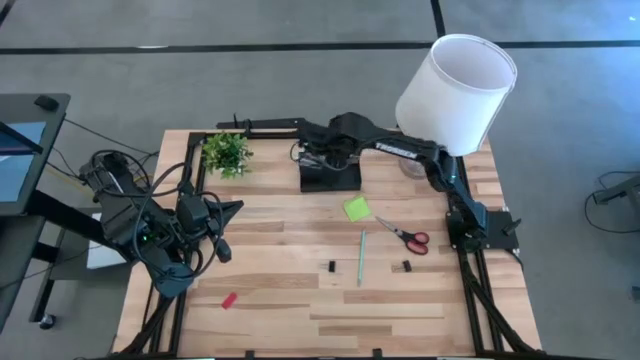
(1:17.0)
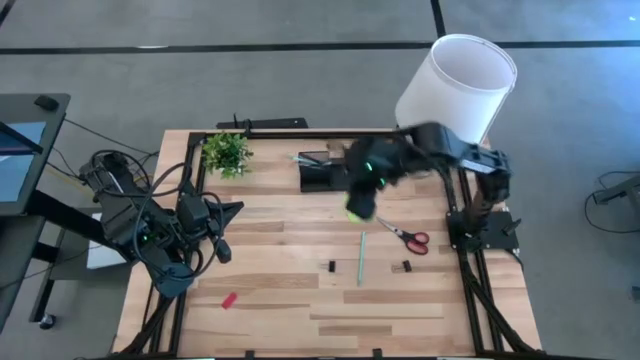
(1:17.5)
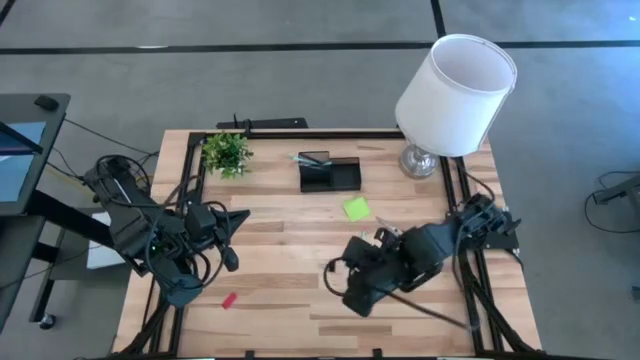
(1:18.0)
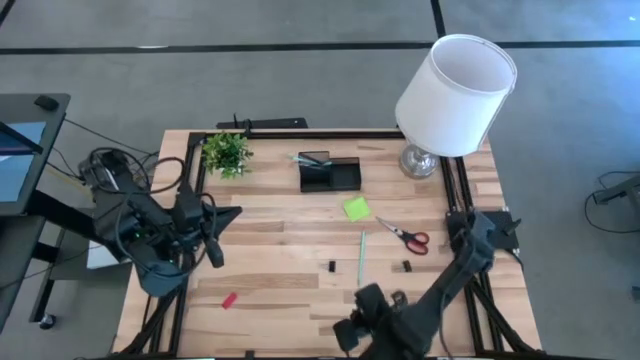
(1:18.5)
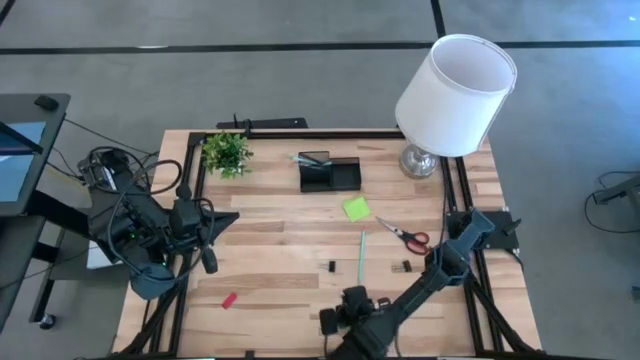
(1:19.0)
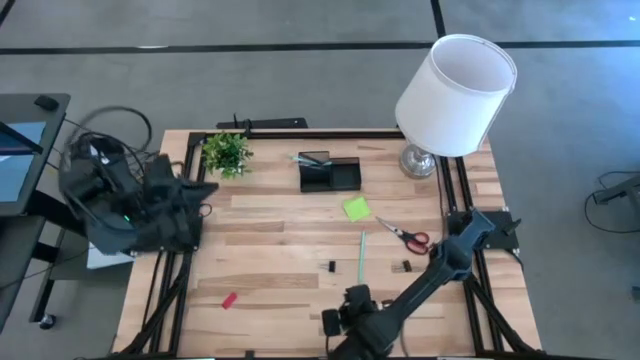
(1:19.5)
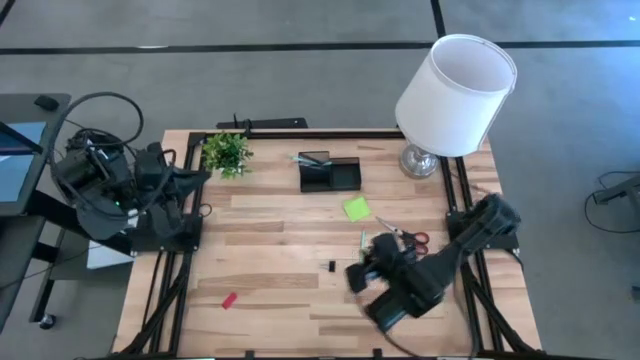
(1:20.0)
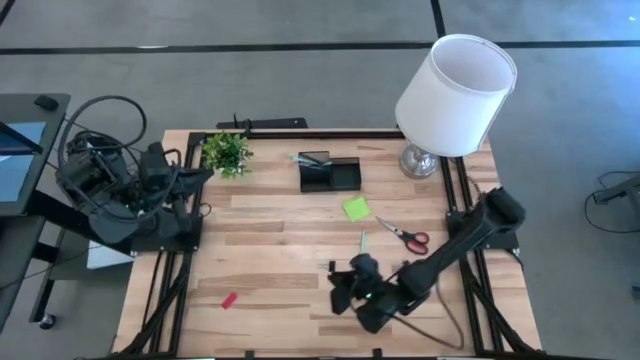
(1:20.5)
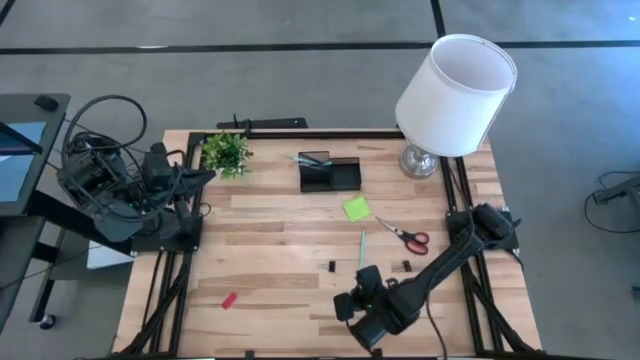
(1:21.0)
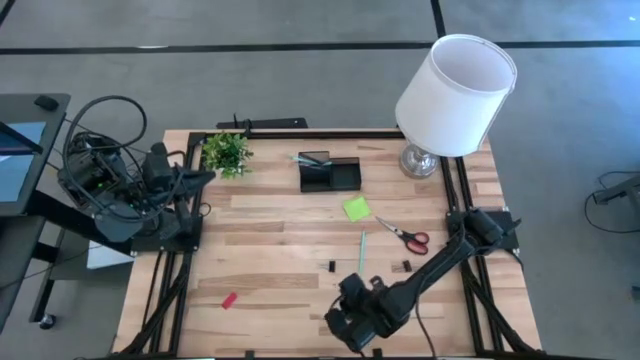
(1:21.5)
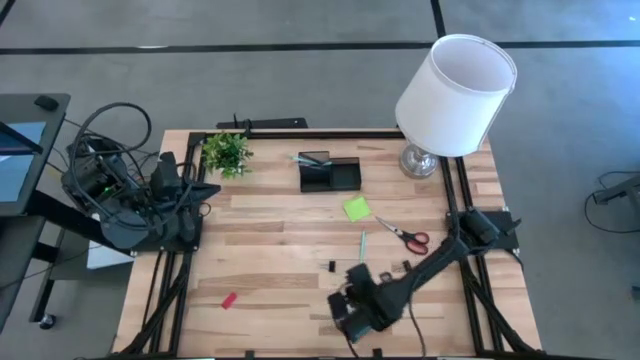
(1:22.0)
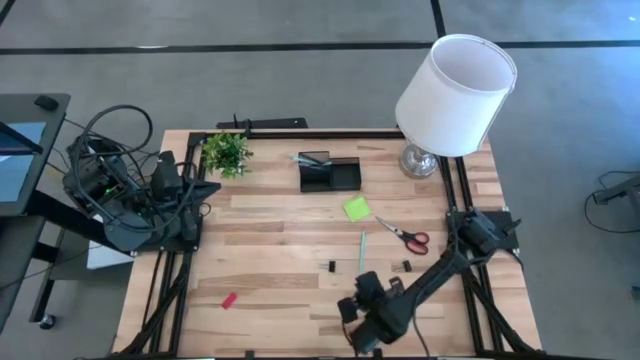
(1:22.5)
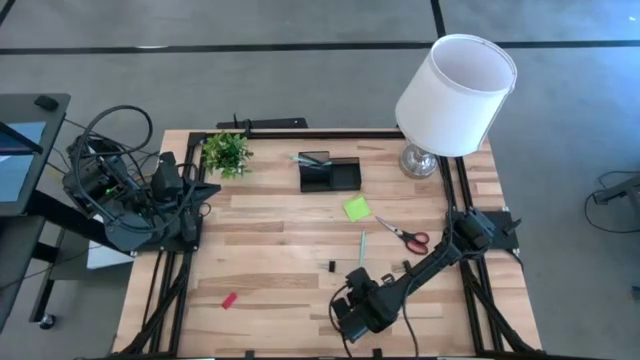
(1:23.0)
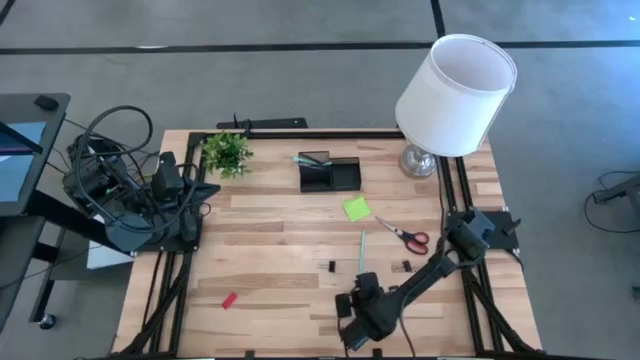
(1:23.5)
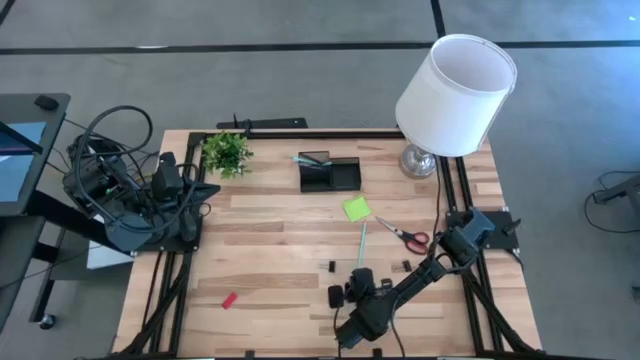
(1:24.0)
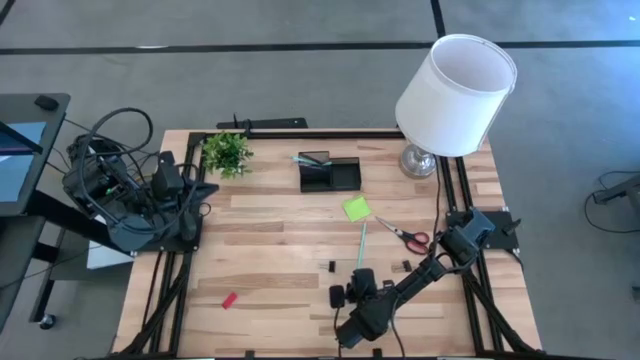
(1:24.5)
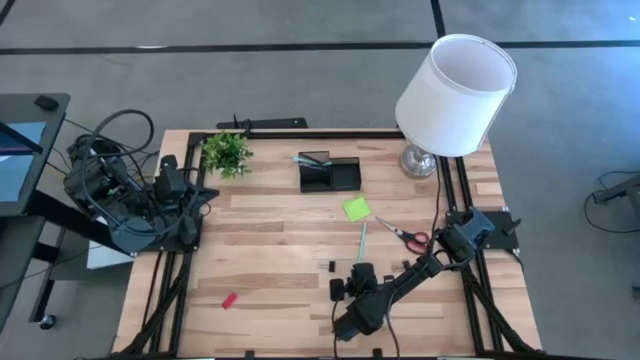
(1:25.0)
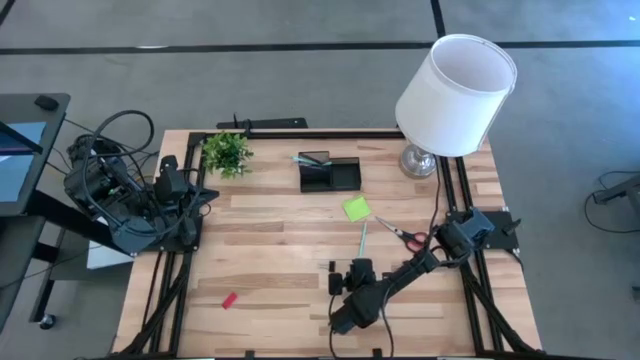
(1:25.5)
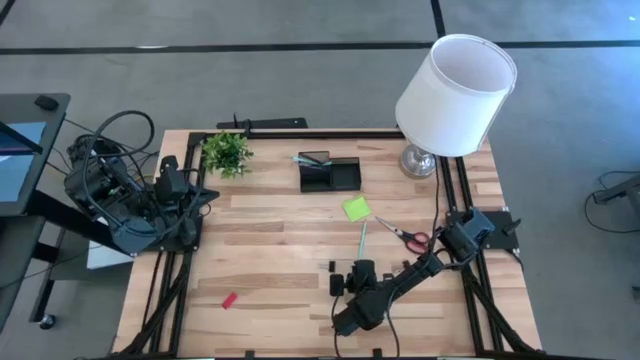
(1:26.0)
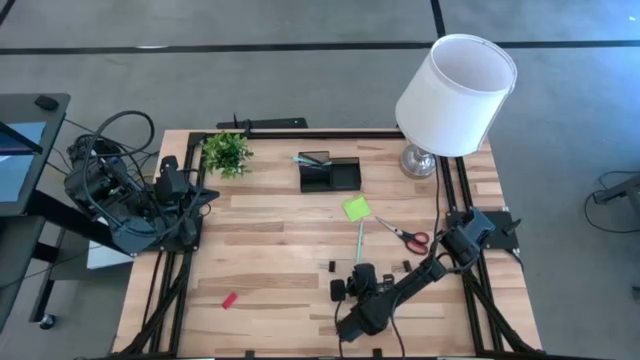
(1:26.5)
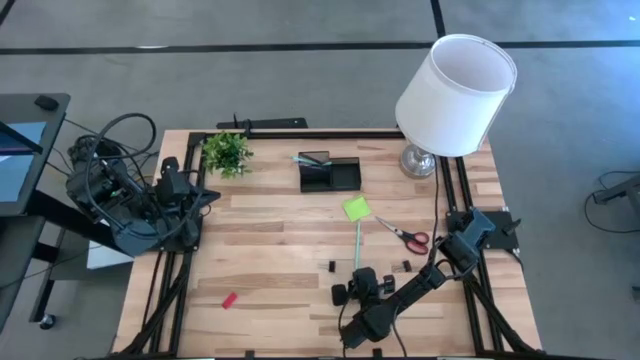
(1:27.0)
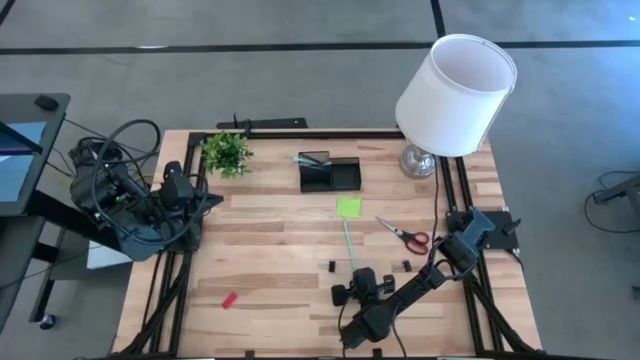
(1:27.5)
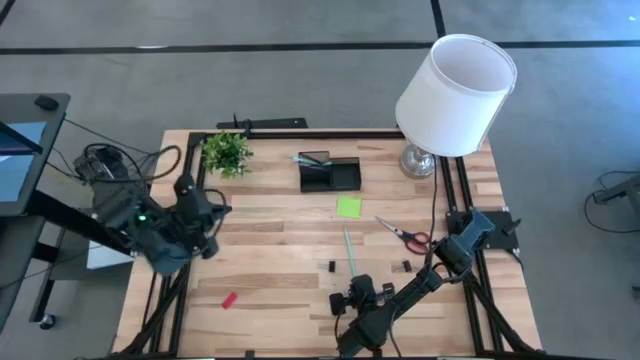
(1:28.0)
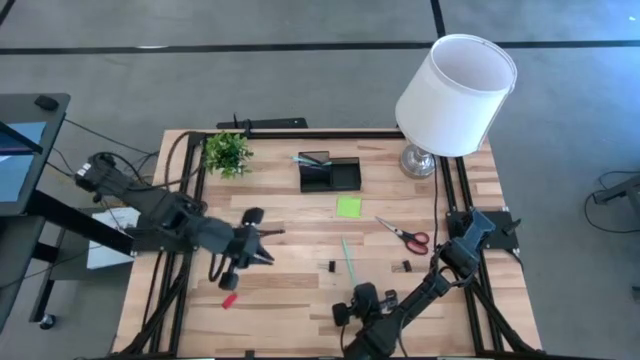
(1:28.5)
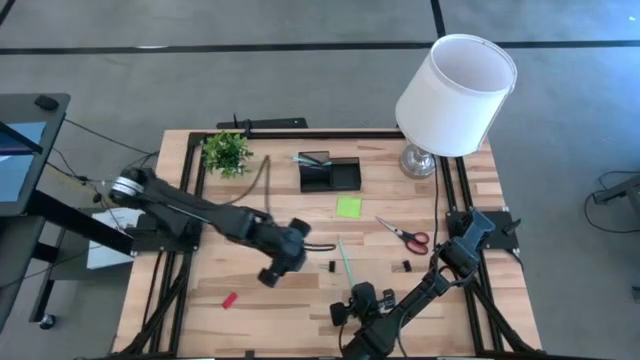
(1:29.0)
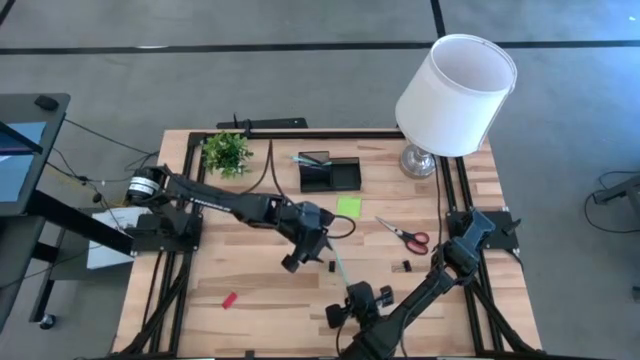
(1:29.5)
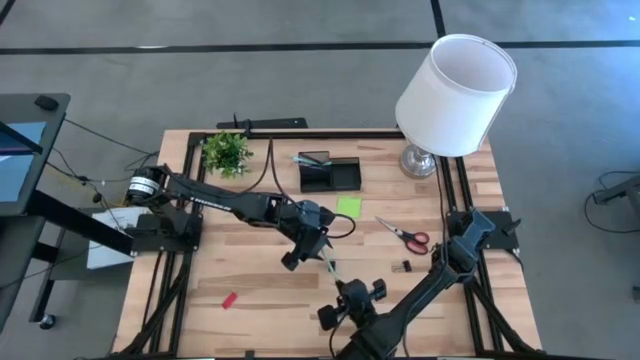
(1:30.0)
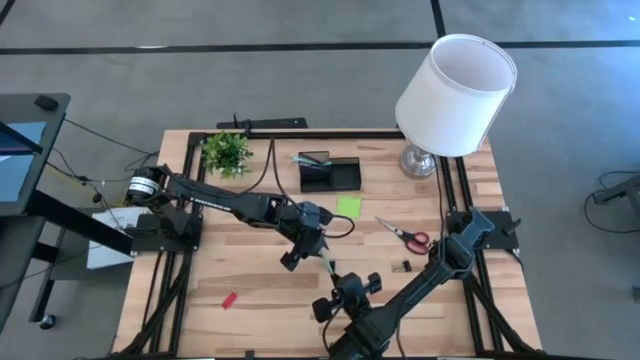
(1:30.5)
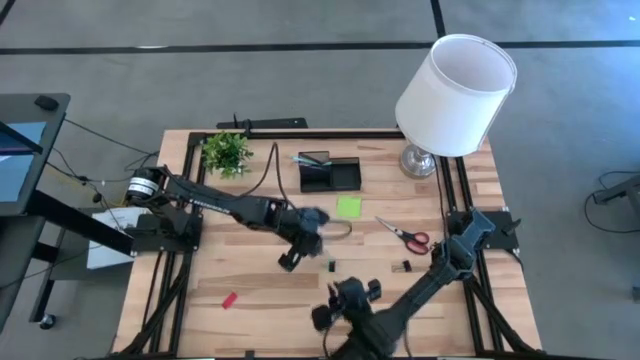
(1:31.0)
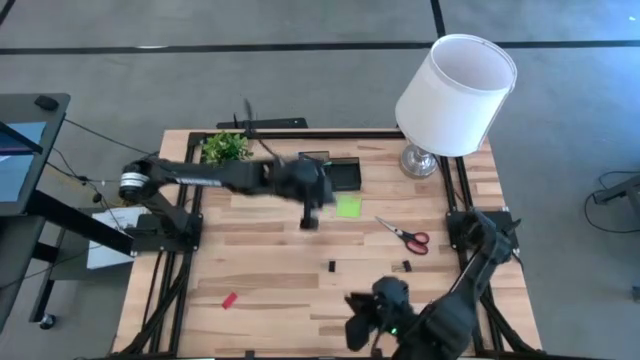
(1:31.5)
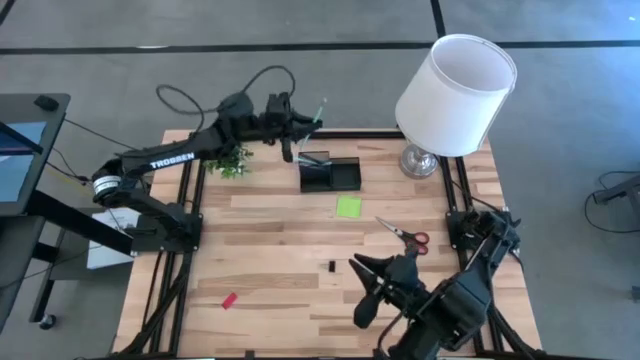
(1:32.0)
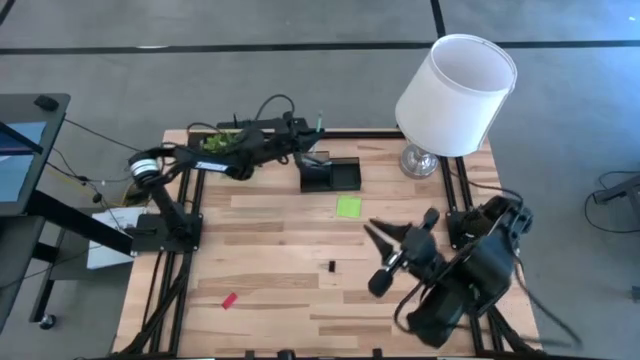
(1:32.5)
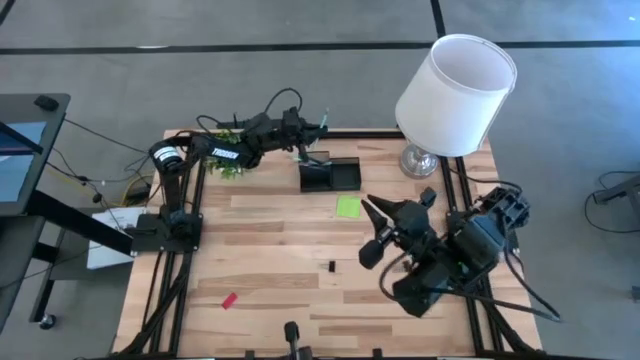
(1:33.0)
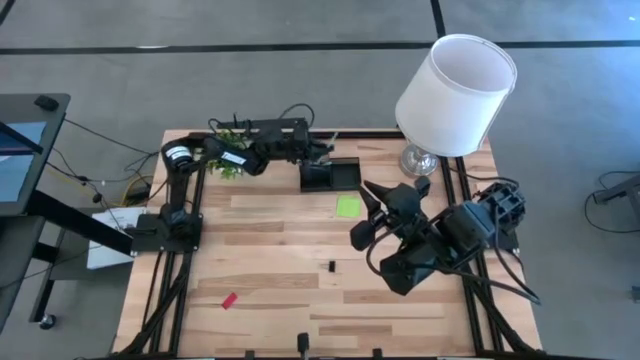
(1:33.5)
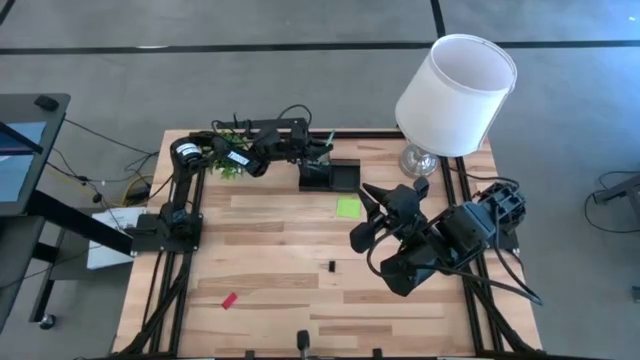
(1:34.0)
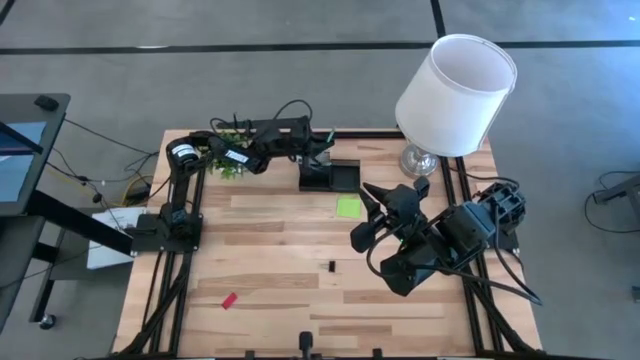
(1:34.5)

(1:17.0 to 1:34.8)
Task: Pick and place office supplies into organizer
Put the blue pencil into the black desk organizer

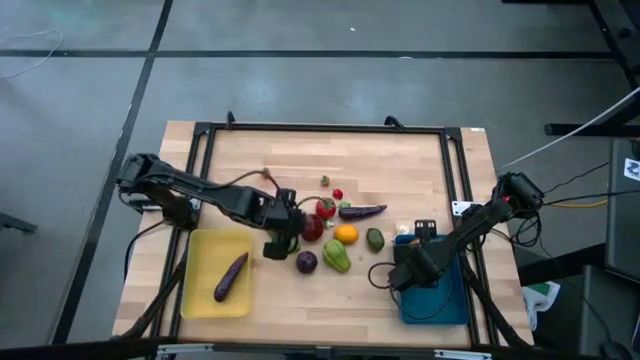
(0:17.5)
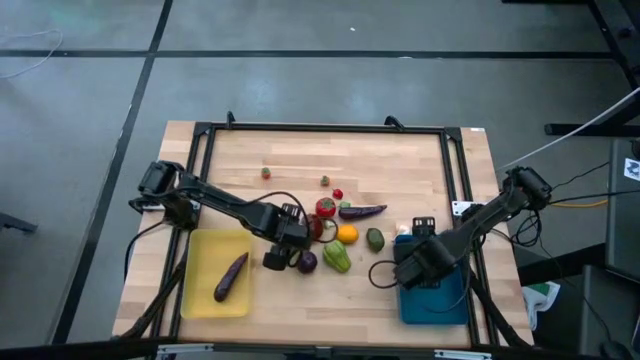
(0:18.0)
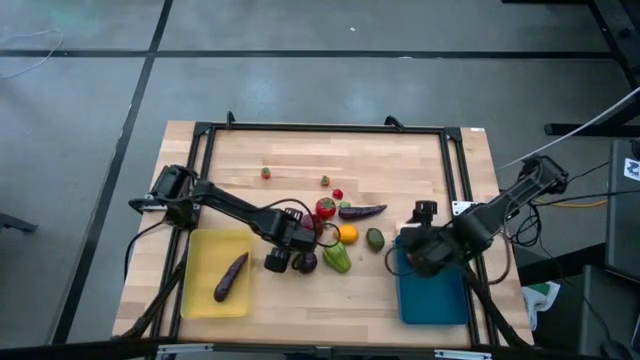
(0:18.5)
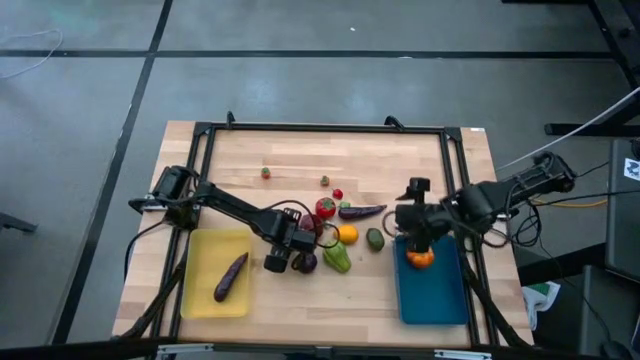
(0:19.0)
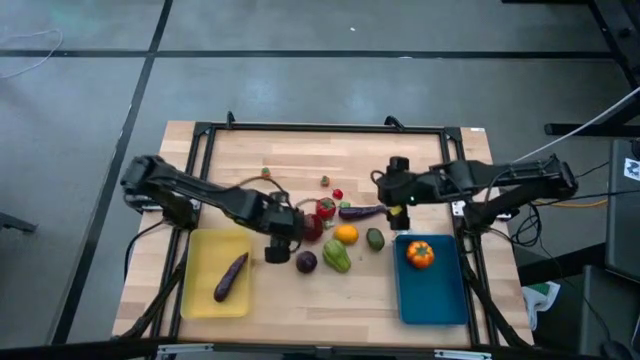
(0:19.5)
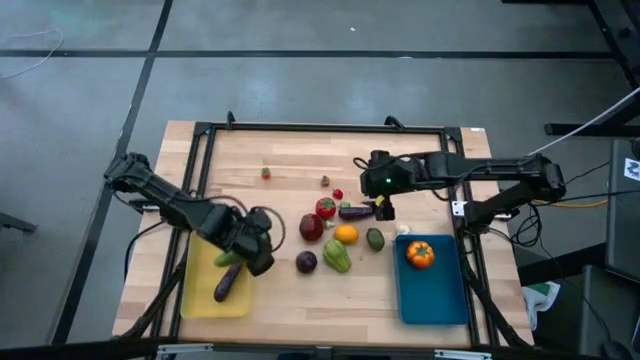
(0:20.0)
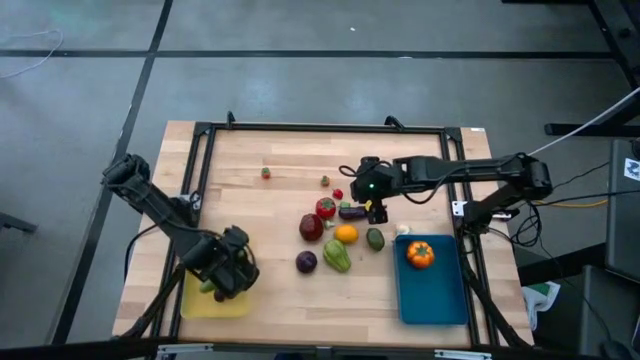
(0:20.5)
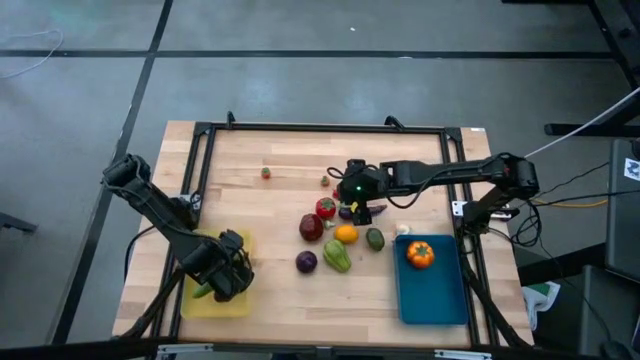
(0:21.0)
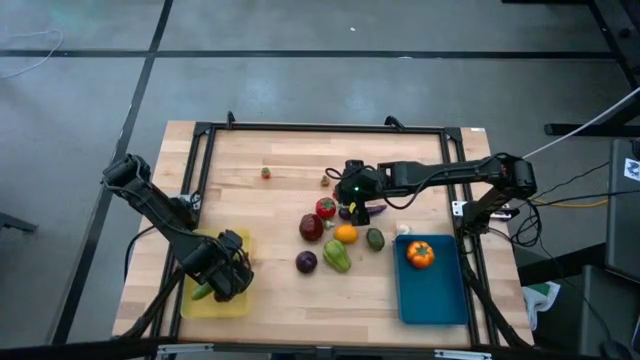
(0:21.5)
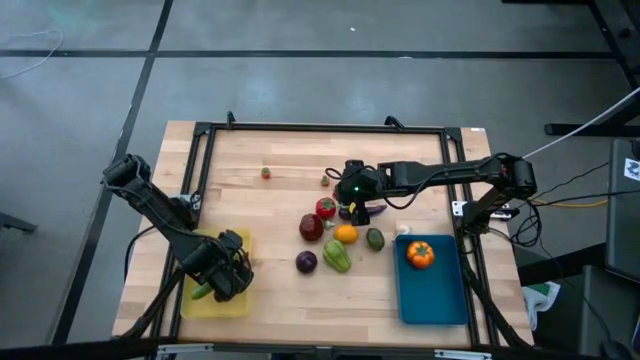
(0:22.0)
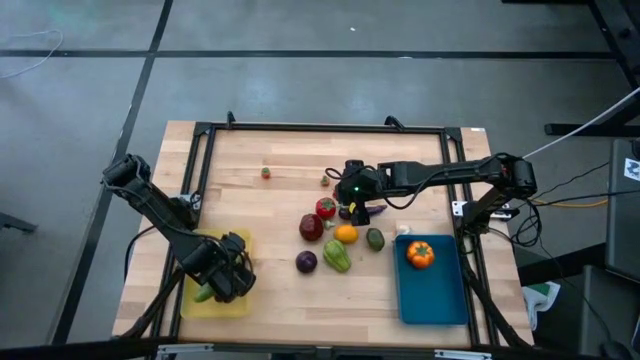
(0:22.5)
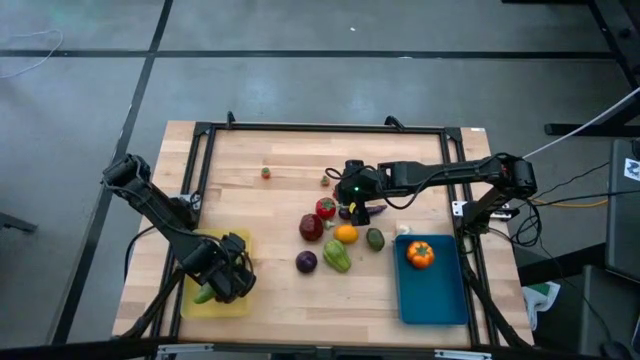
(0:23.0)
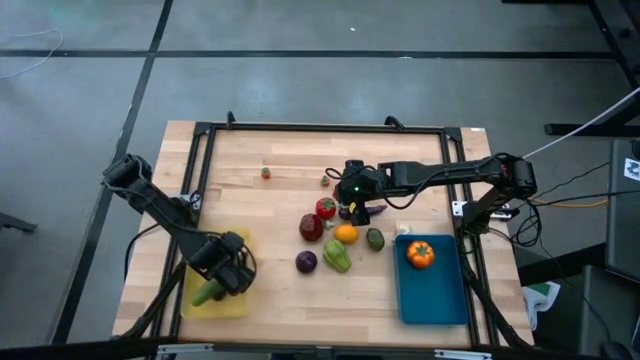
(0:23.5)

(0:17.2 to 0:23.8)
Task: Sort produce into baskets
Put the cucumber into the yellow bin
